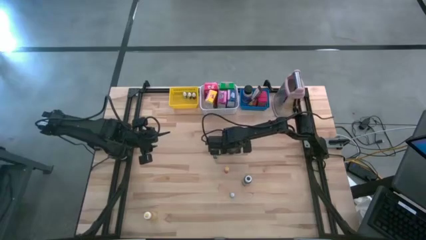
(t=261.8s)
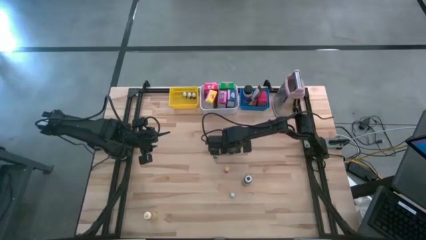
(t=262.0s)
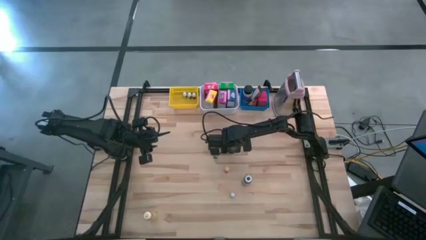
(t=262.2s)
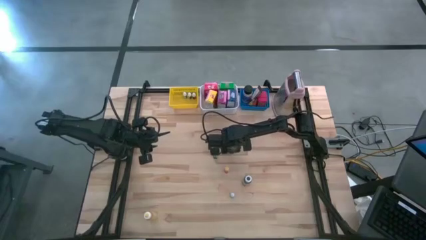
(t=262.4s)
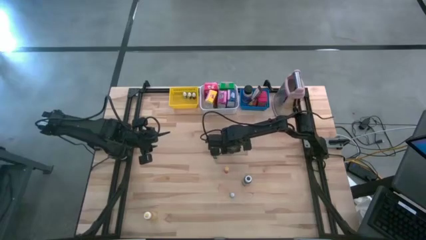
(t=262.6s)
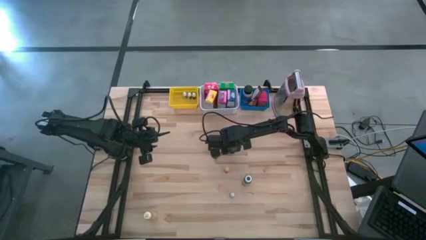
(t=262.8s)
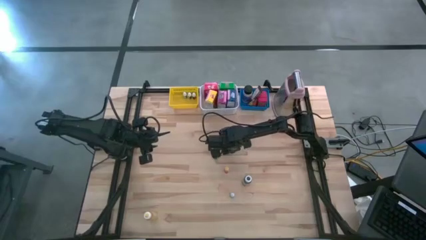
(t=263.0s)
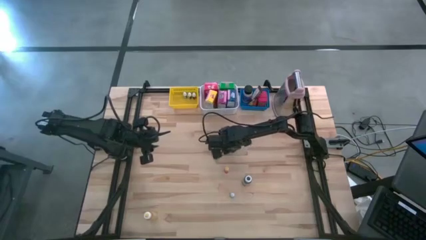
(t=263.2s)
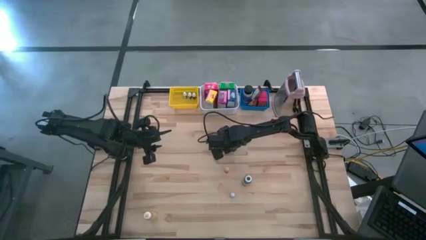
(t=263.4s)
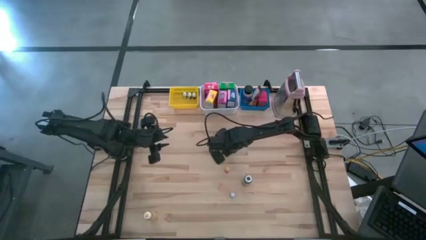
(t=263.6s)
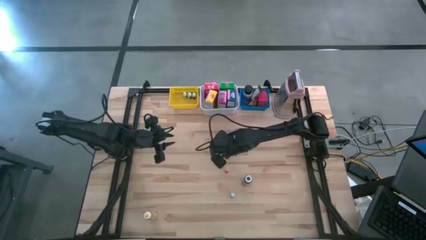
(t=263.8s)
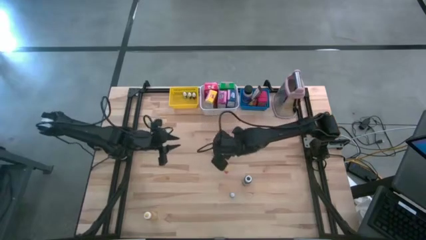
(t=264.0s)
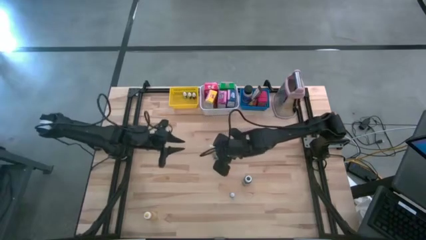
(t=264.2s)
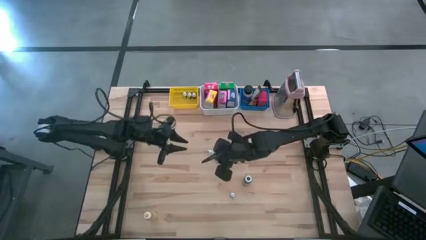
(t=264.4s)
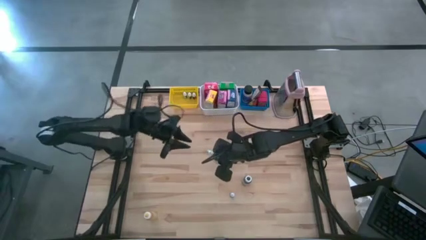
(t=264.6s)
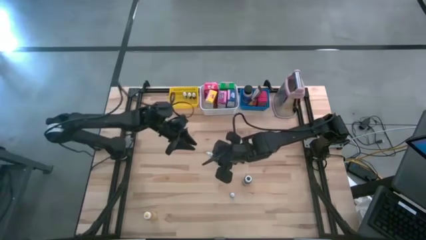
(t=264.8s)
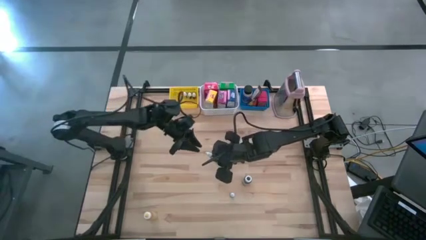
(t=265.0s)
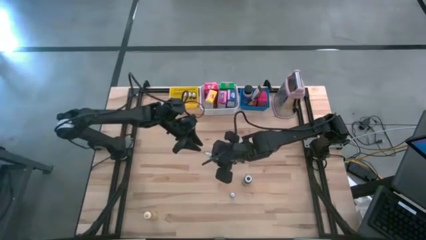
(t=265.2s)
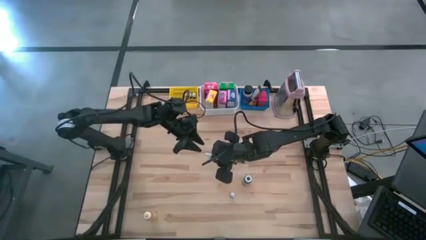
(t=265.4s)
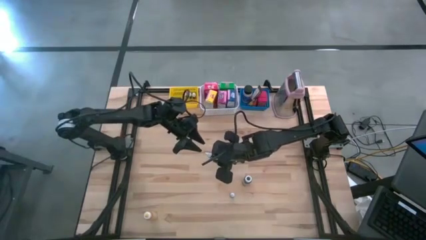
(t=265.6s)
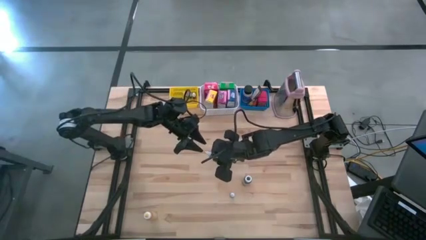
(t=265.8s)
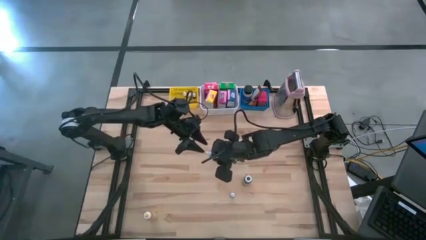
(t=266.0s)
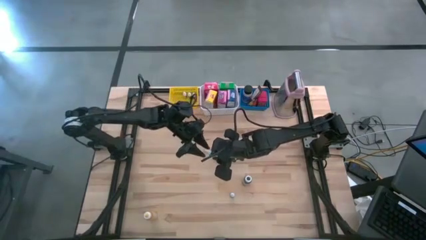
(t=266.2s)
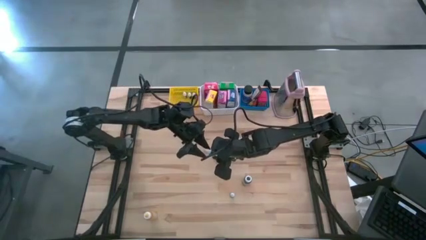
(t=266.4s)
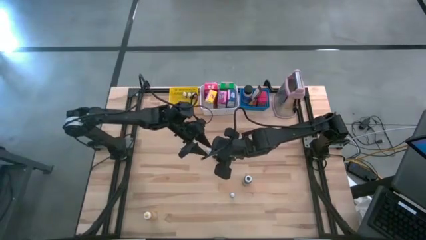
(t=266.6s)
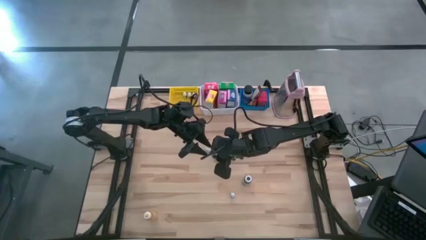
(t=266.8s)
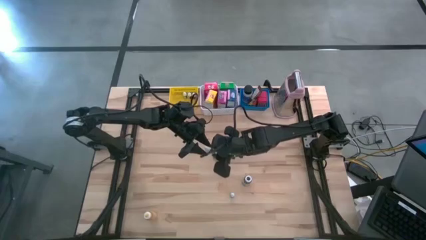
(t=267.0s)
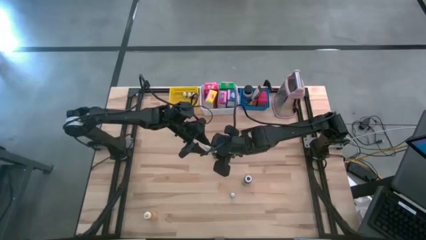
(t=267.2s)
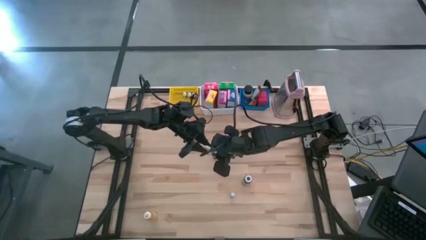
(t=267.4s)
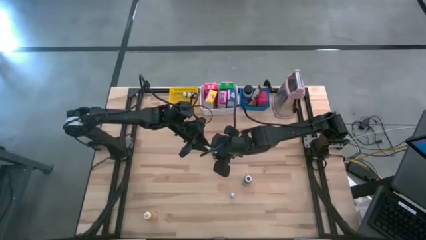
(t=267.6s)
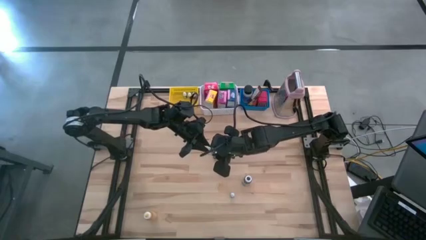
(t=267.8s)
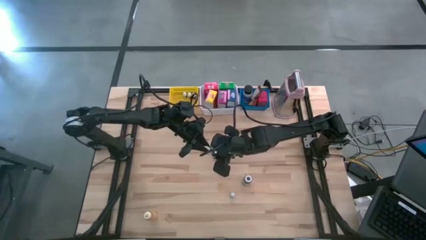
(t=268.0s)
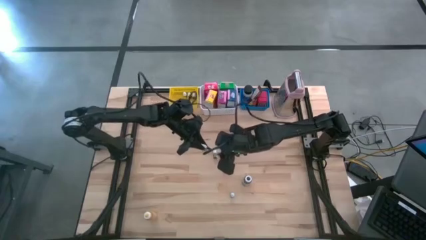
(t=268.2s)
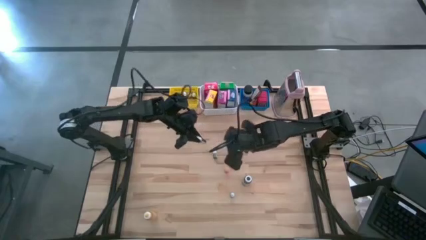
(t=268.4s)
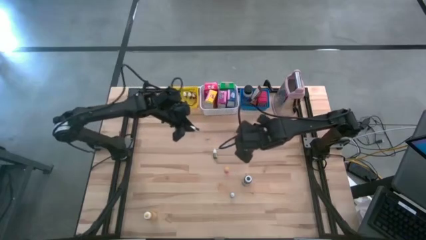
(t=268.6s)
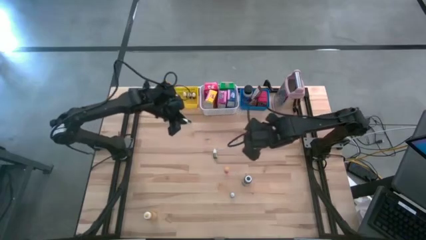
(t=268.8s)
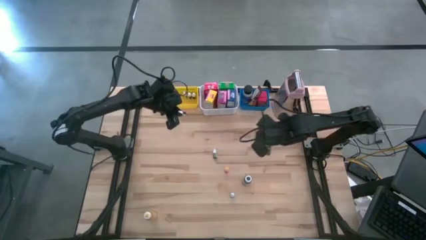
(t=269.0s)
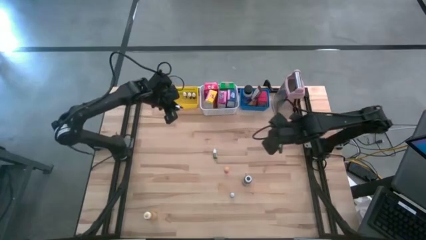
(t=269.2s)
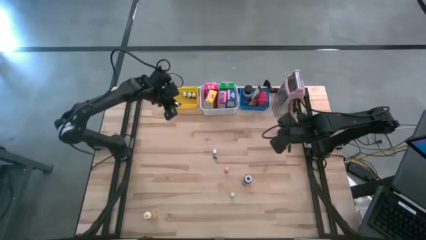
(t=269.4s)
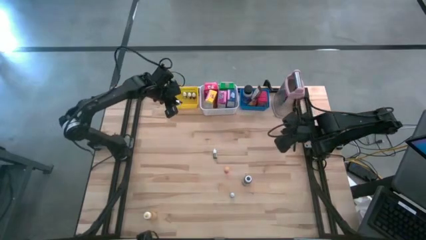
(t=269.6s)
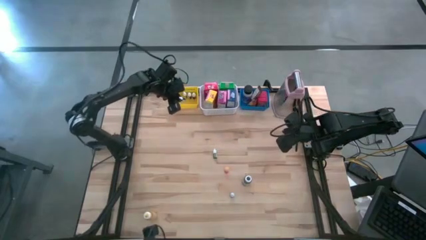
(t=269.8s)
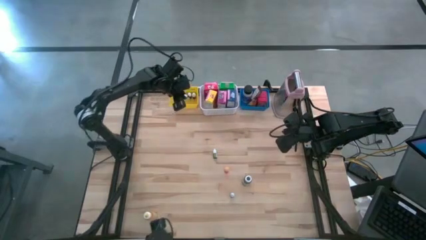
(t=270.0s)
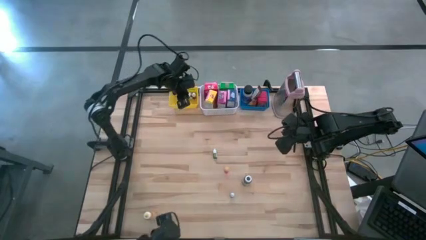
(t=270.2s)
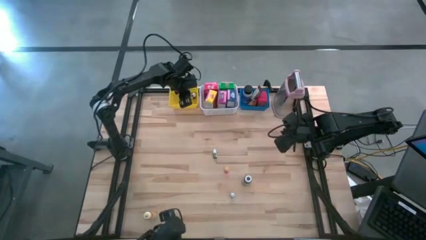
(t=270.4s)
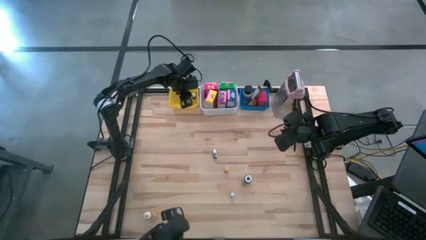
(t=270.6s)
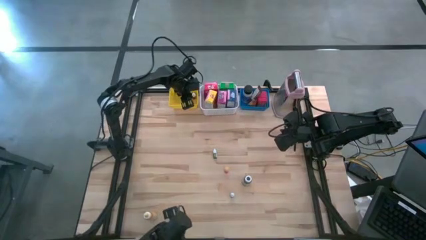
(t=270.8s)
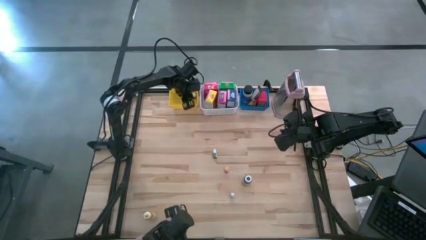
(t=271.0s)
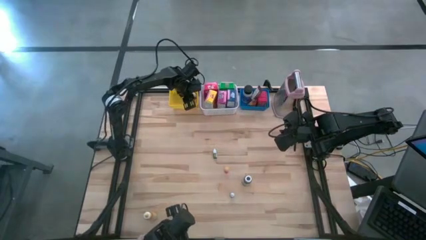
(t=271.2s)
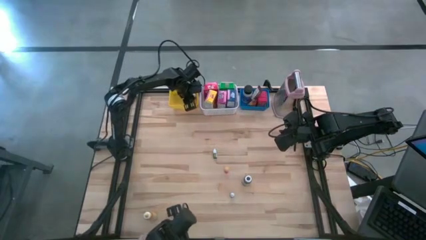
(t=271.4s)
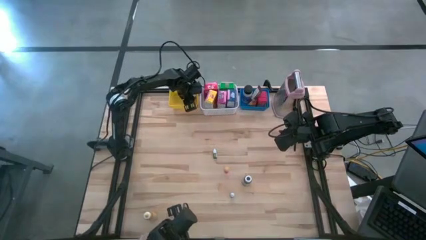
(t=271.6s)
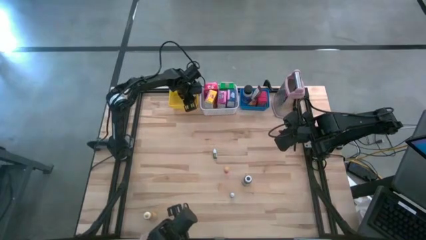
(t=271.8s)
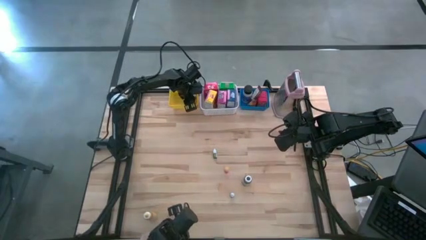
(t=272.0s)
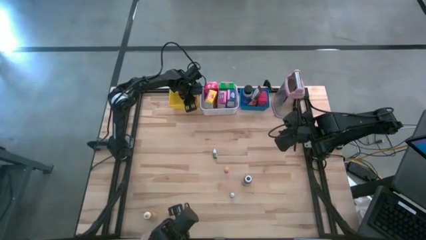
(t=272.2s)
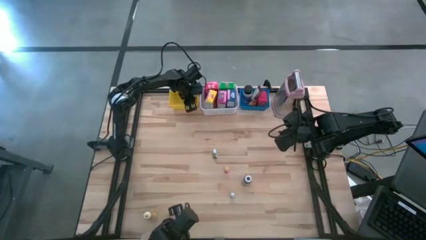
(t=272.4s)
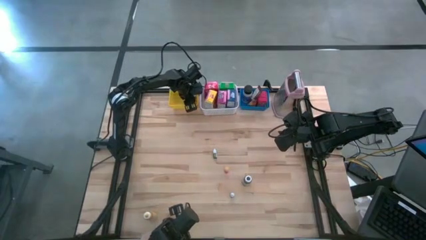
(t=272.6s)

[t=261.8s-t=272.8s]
Task: Pick & Place Kitchen Items
Put the black food coloring bottle into the yellow basket

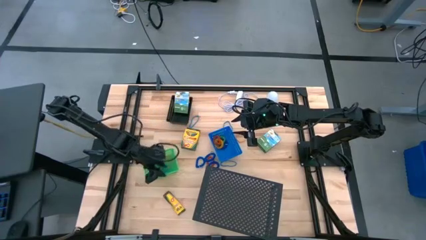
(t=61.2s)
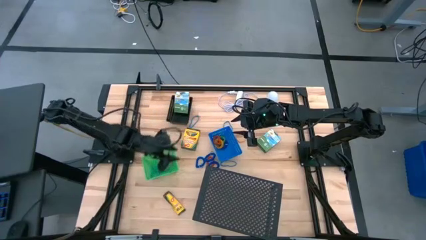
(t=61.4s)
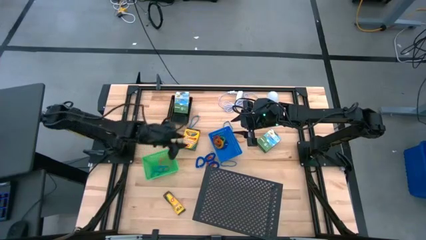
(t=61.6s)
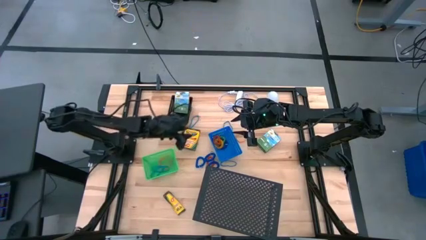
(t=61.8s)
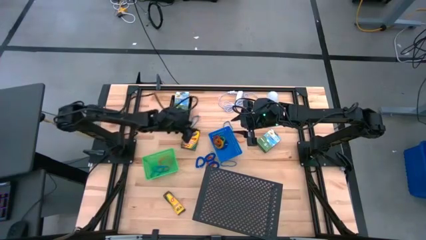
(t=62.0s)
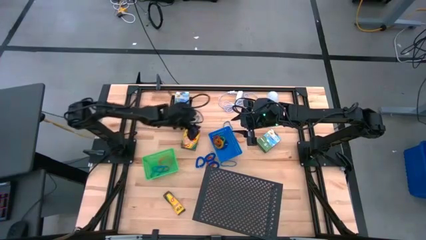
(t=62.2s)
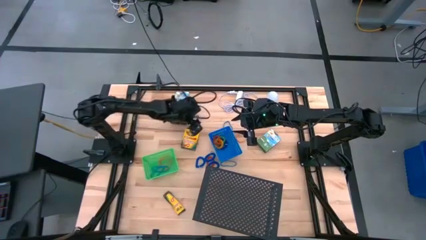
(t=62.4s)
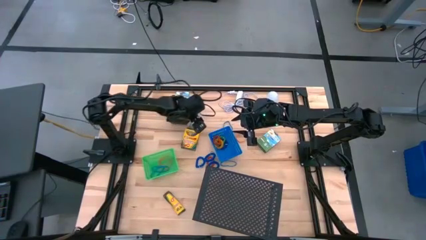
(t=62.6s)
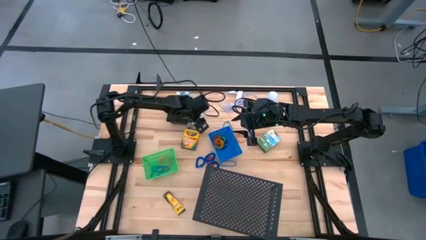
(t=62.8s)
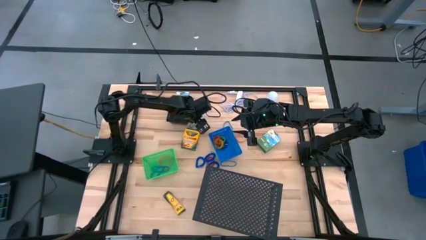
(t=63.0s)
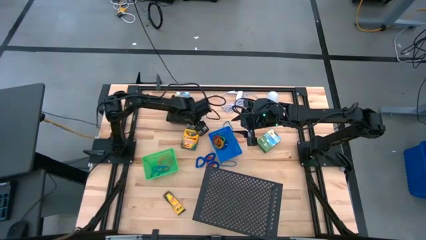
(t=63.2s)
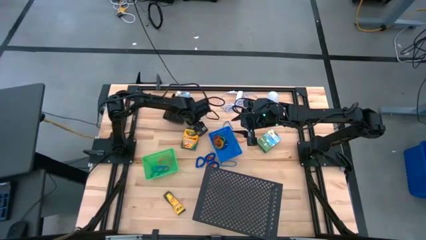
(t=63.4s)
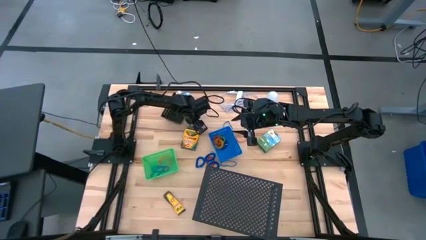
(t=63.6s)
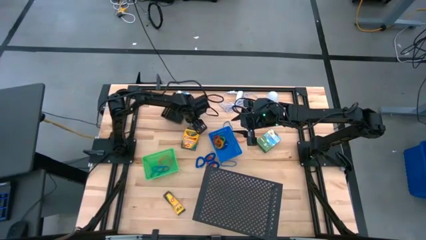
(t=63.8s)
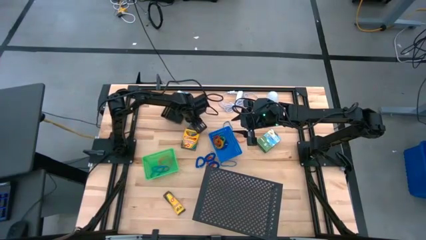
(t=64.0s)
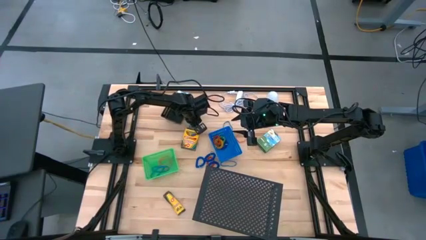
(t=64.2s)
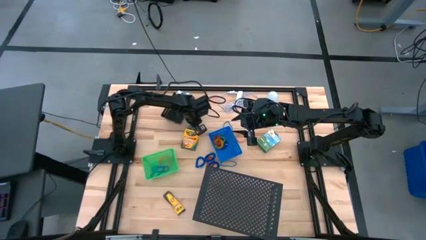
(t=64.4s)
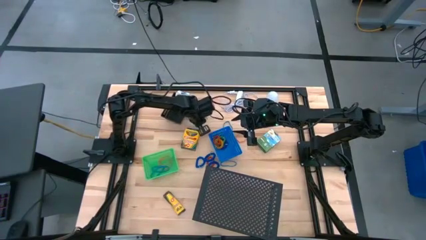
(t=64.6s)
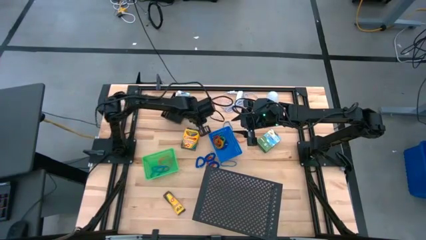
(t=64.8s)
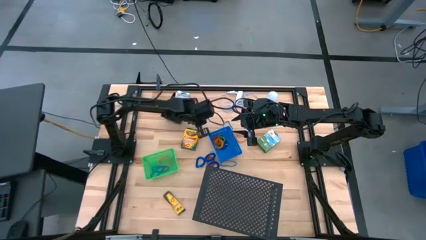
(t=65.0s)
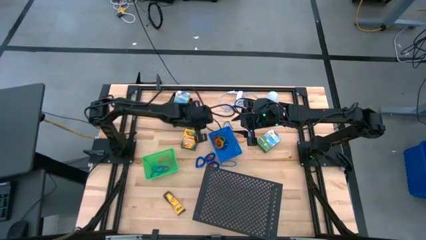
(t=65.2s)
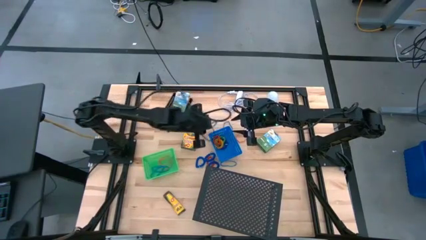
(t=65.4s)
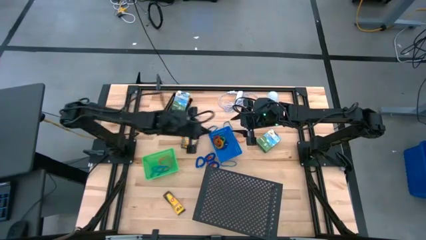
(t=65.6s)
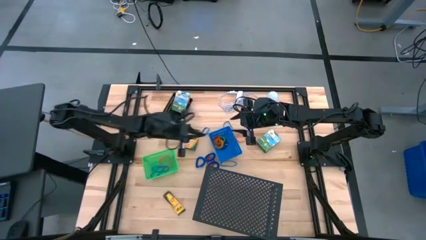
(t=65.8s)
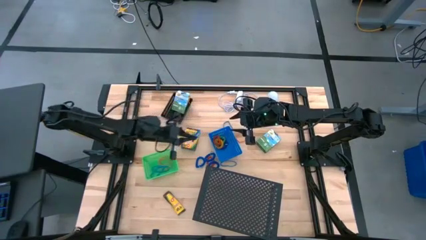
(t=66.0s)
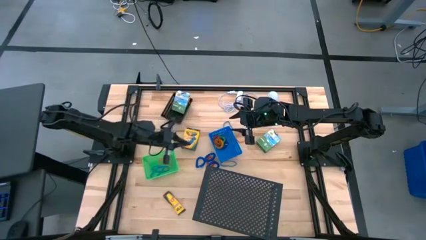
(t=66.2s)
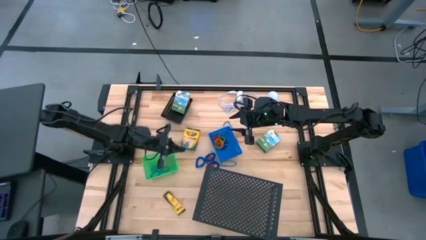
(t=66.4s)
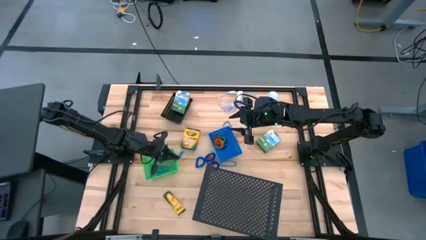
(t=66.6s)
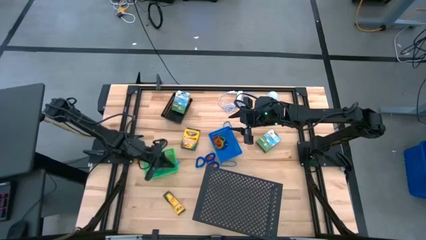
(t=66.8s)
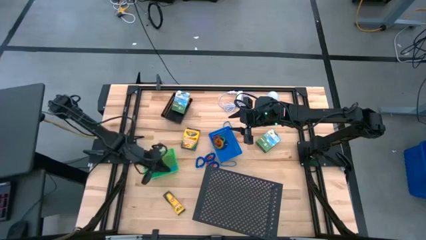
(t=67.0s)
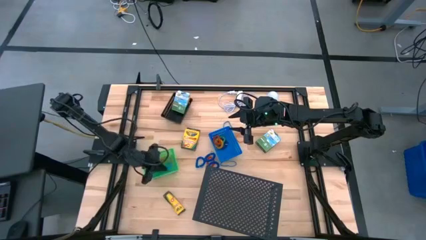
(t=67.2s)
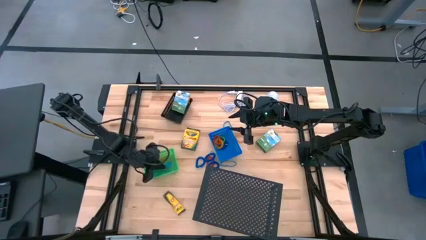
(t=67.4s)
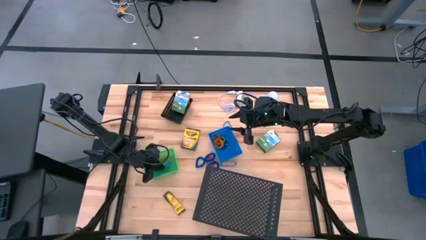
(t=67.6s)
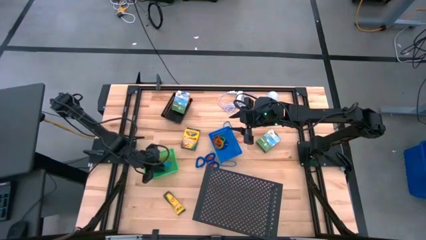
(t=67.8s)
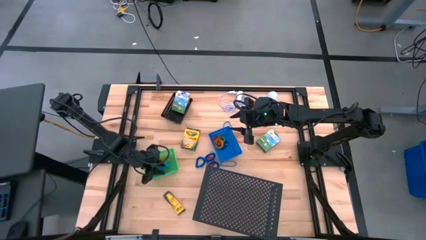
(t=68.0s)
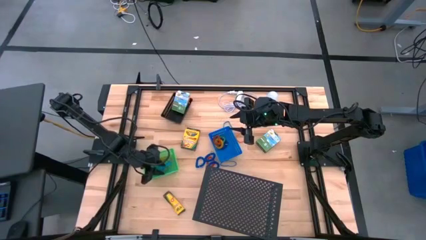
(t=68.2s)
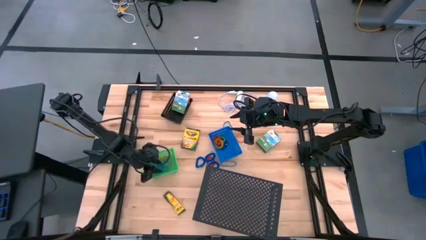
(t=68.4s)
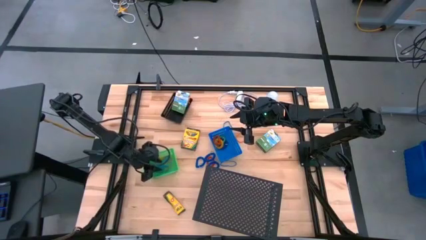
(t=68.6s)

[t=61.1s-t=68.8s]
Task: Pick & Place Office Desk Supplies
Put the left blue rubber band into the green bin
